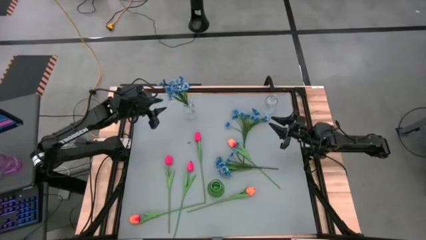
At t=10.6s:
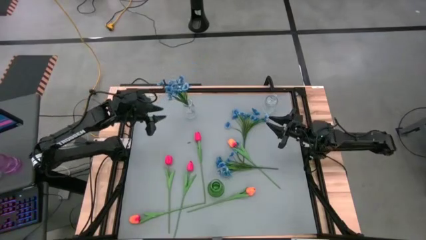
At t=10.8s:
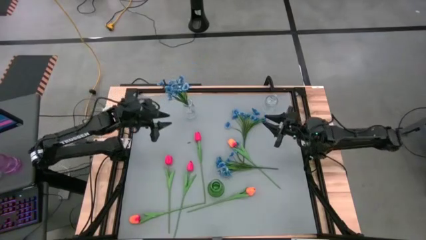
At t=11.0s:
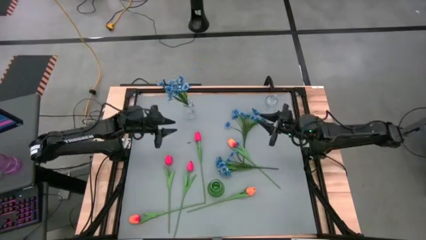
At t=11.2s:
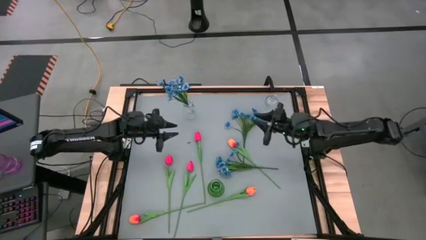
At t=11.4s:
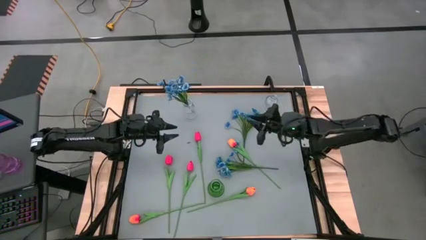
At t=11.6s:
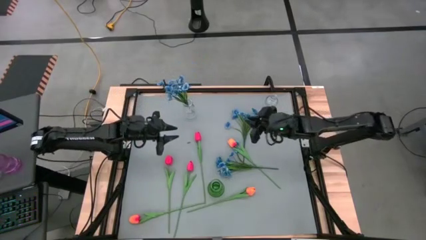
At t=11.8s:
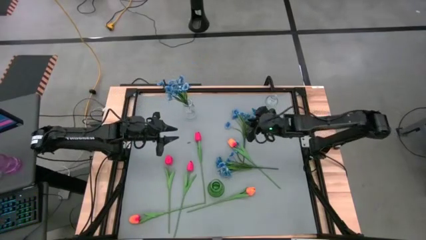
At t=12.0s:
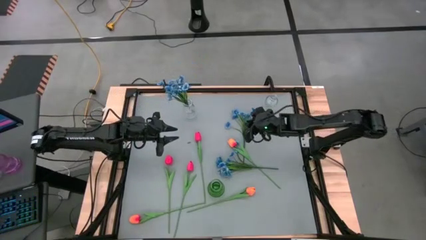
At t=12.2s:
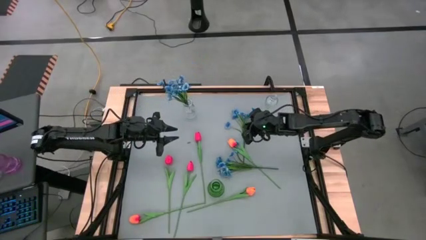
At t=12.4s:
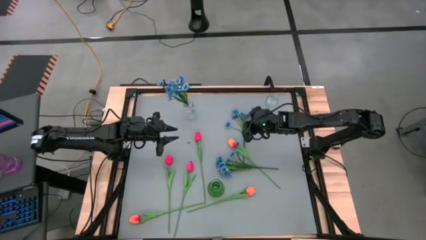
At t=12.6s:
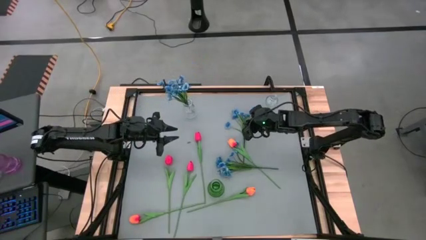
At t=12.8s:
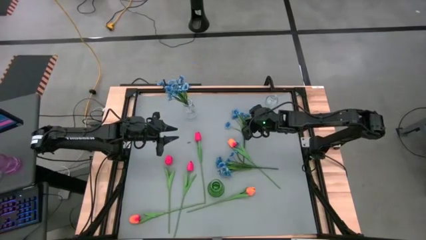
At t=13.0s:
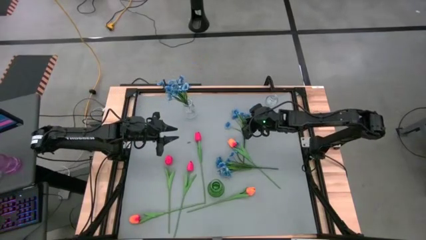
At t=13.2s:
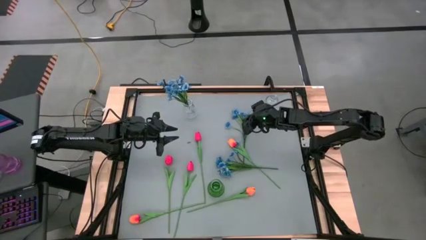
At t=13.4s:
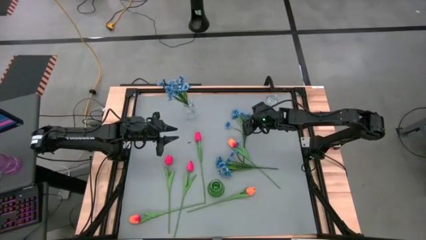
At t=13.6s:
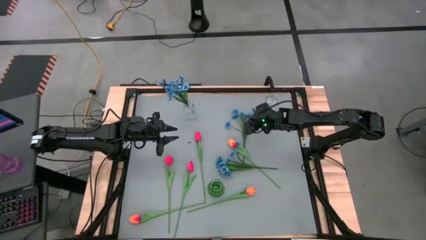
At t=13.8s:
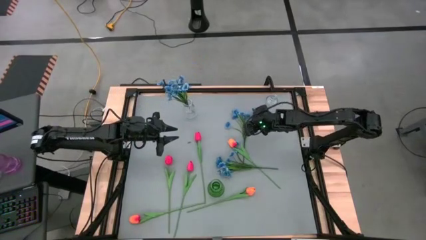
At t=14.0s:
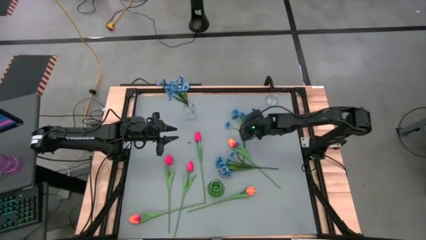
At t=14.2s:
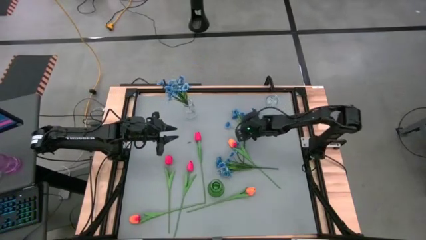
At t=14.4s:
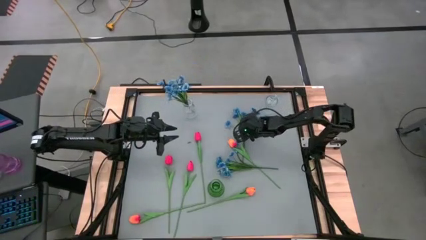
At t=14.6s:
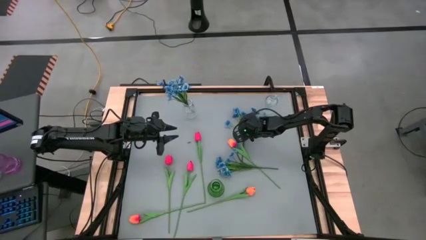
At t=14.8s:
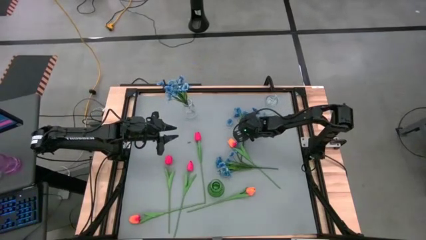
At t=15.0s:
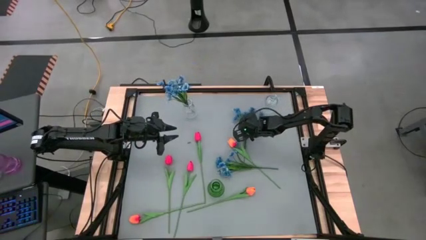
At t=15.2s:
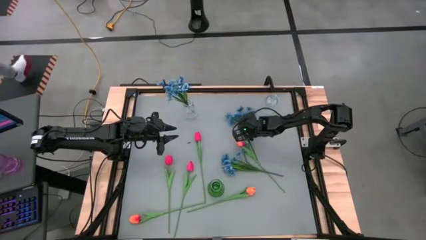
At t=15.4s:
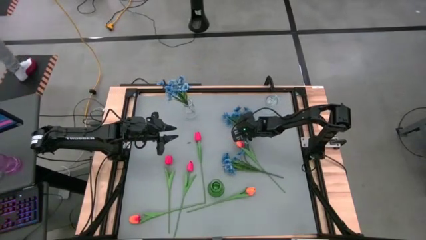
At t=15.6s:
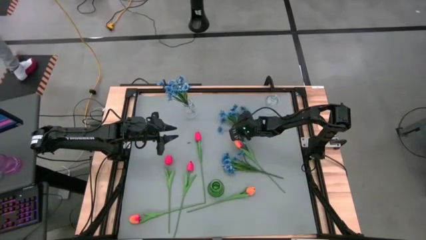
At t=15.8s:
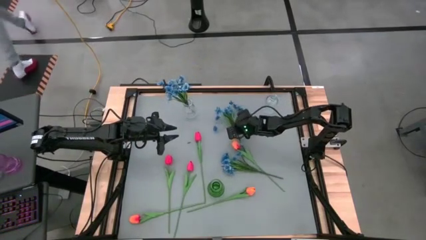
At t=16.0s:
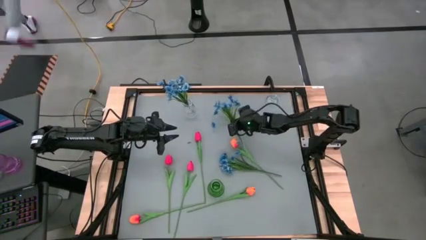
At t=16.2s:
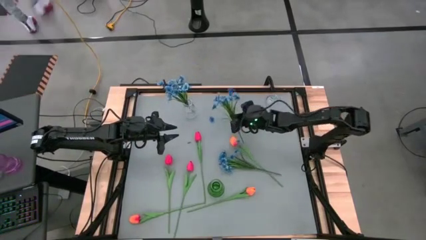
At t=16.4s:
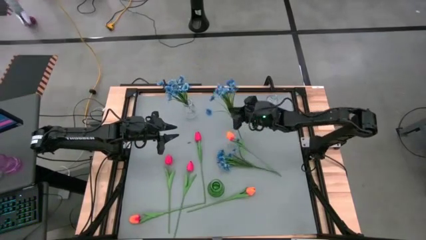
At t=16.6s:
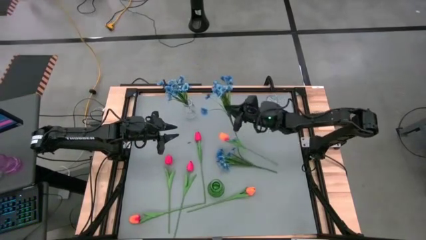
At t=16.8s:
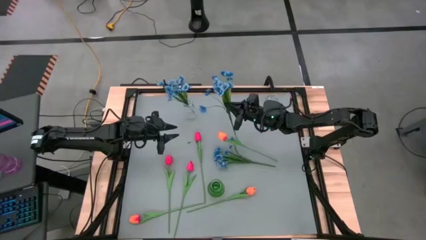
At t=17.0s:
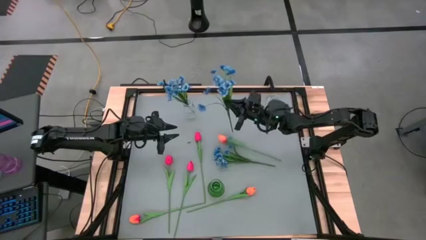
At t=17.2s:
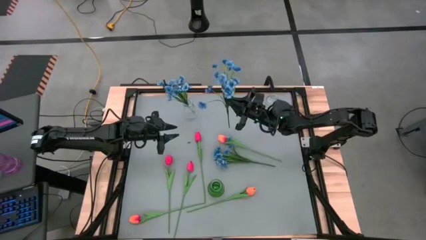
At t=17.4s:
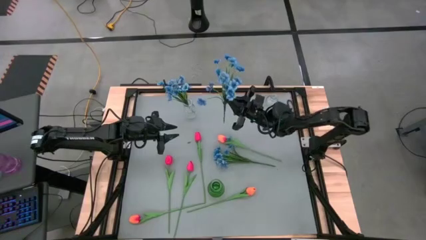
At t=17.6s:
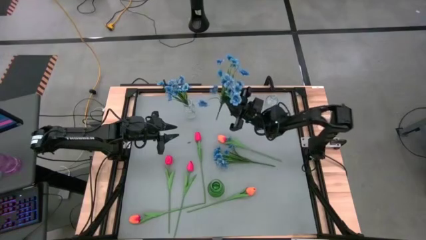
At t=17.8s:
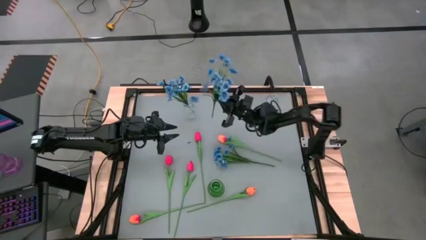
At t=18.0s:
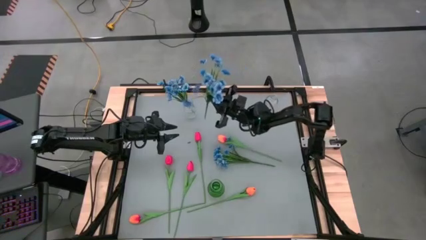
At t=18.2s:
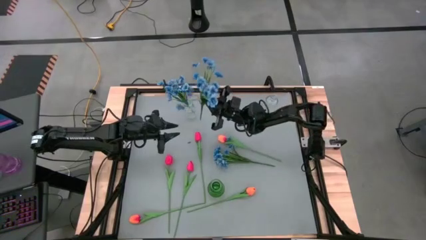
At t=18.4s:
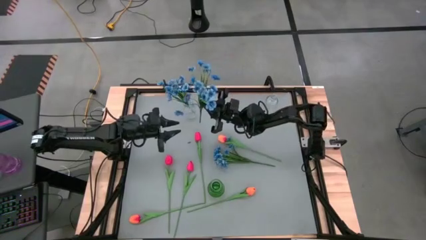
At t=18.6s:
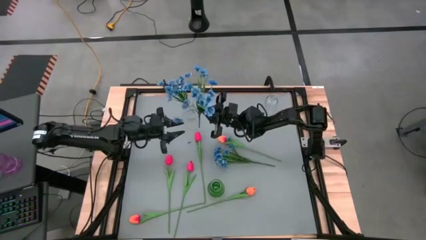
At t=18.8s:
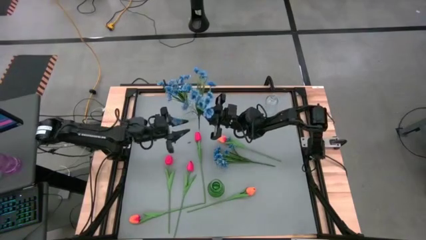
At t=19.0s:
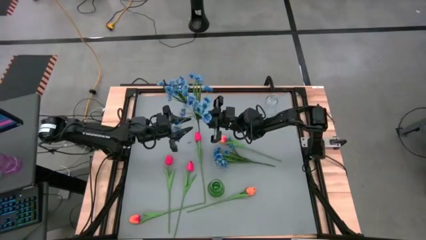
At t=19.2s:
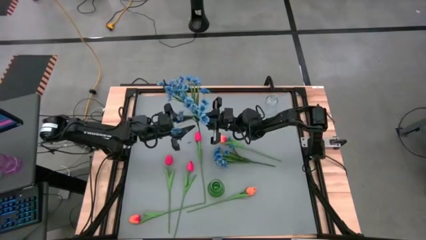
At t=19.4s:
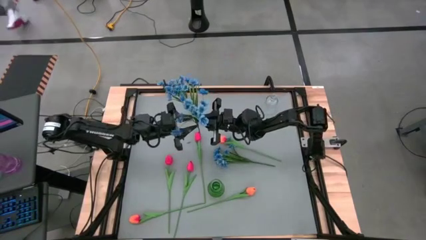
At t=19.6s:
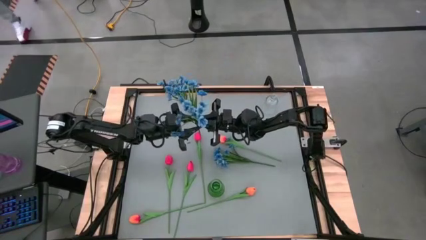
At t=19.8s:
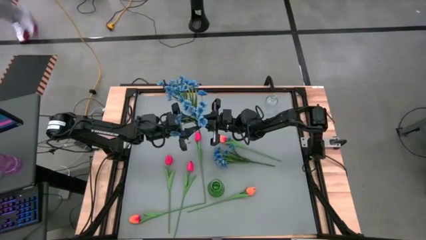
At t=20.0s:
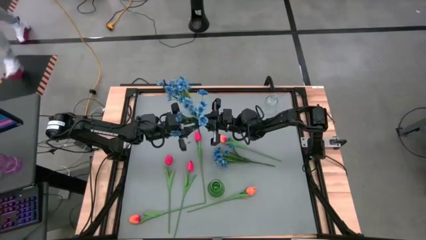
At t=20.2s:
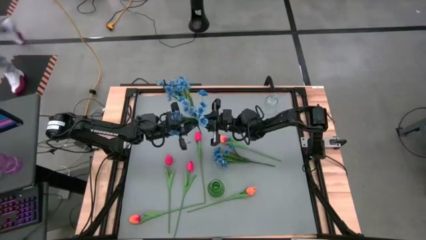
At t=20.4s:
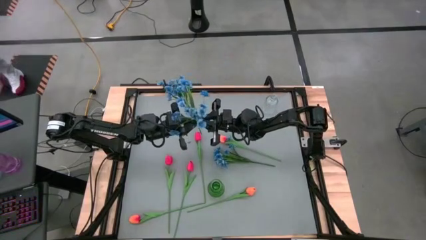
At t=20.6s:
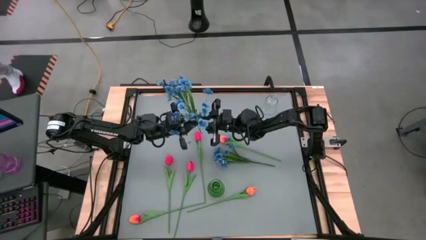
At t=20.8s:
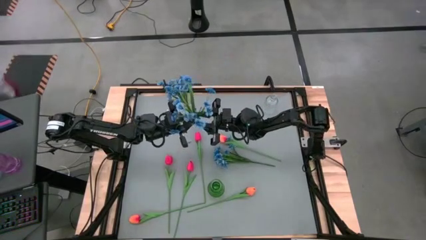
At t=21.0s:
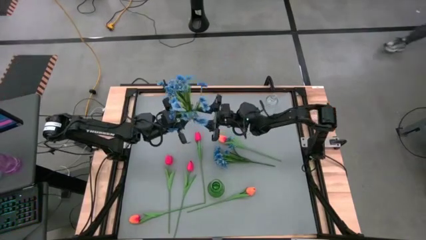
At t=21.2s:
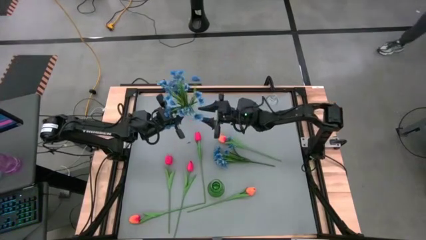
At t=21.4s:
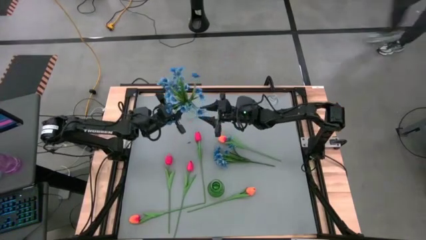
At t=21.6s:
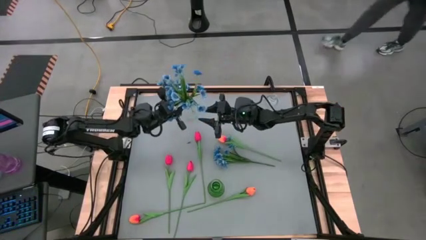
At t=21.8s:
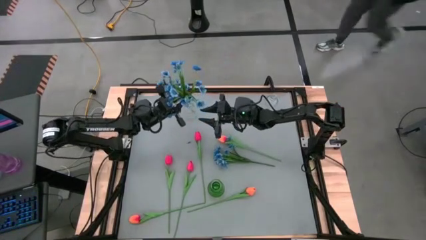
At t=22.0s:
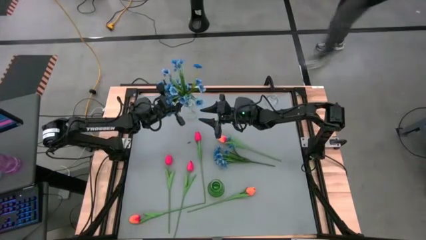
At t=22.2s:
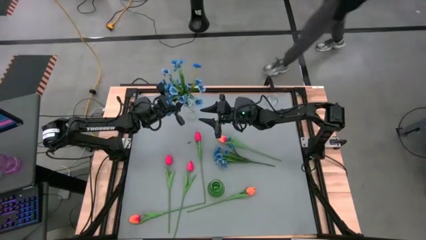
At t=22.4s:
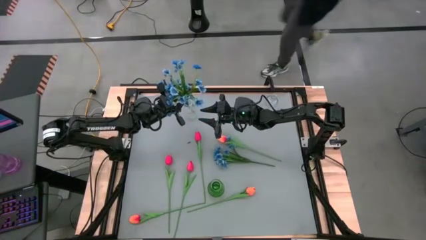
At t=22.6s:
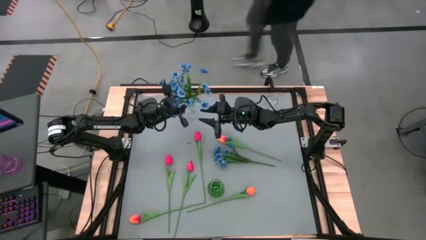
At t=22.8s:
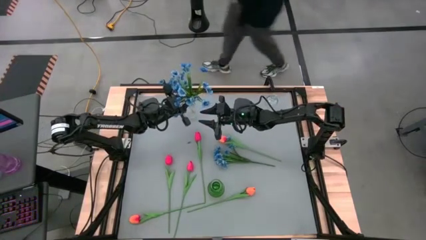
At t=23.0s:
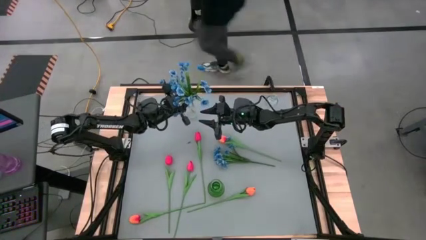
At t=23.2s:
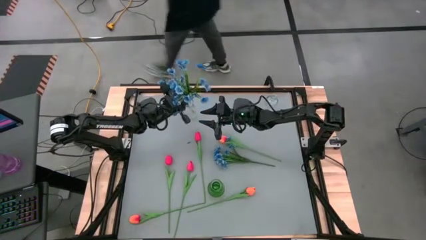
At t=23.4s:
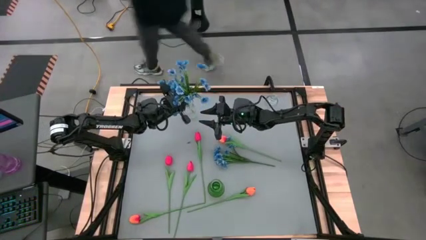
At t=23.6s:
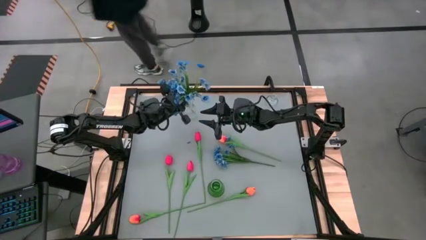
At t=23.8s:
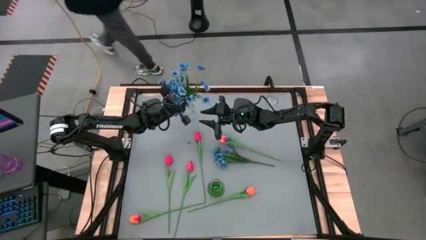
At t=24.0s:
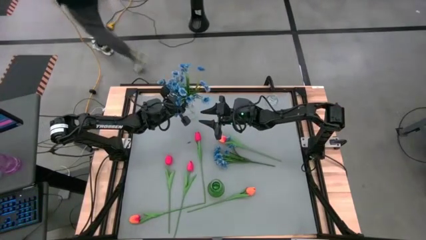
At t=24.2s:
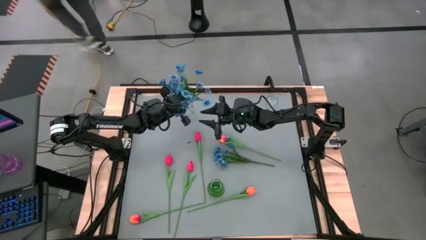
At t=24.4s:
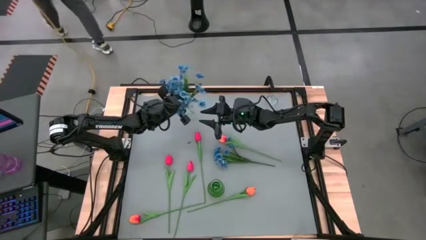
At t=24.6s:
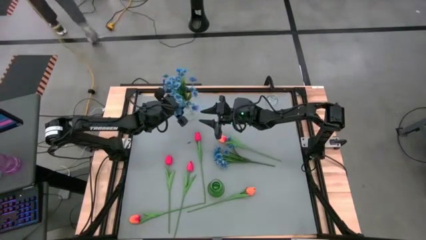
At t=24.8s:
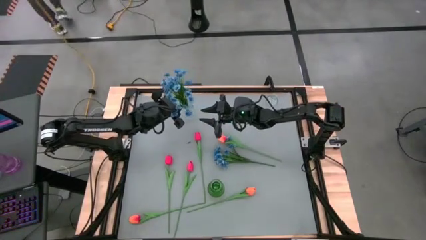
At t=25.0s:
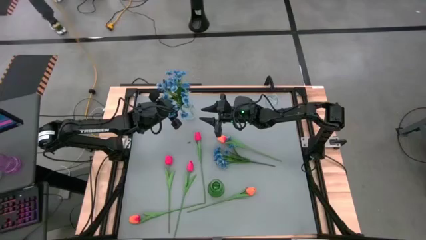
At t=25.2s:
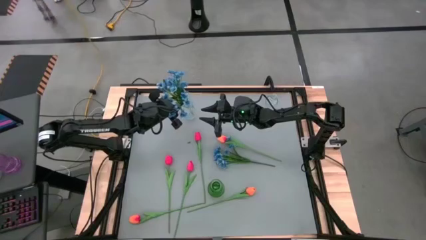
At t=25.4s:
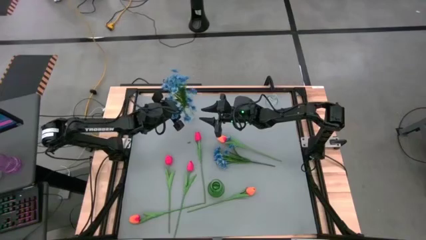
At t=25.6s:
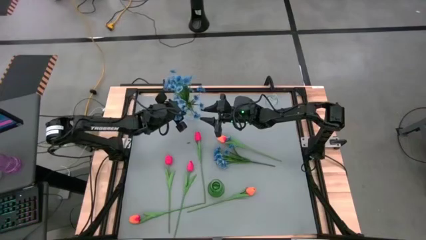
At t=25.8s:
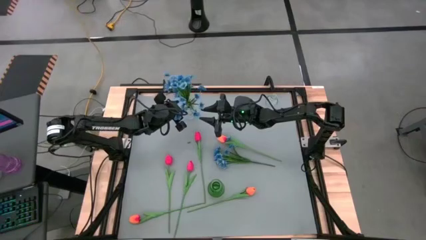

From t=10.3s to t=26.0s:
Task: Sort flowers into vase by color
Put the top blue flowers into the top left transparent vase
